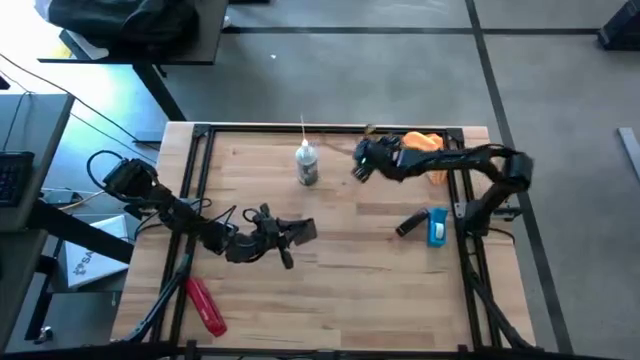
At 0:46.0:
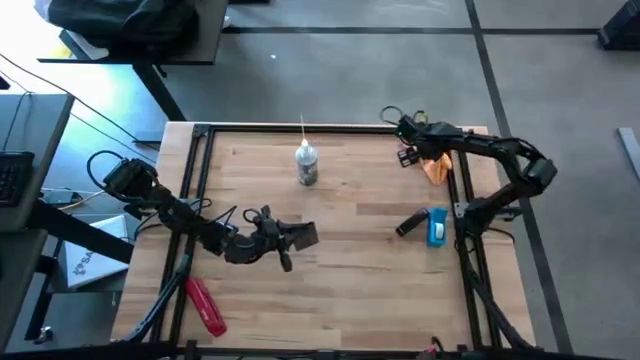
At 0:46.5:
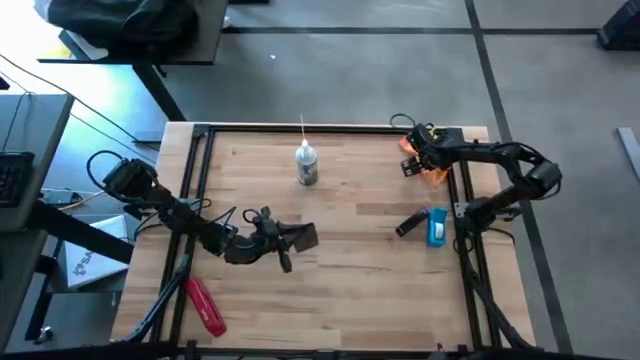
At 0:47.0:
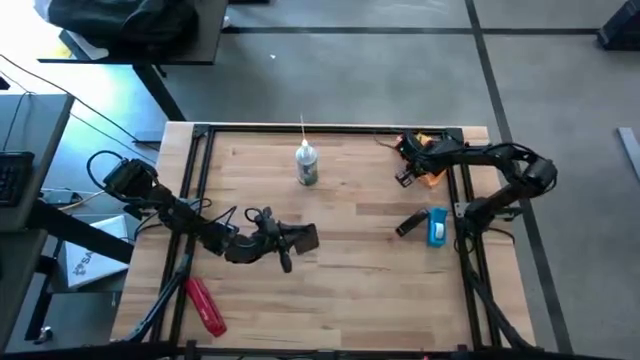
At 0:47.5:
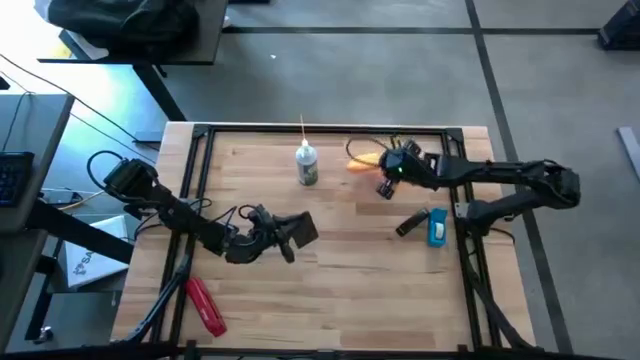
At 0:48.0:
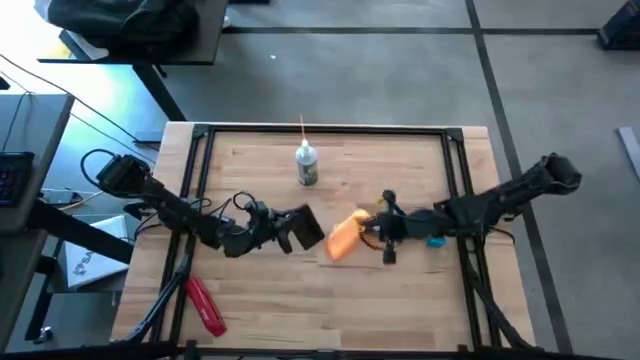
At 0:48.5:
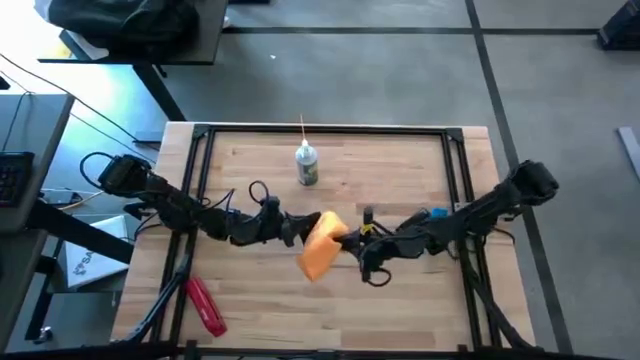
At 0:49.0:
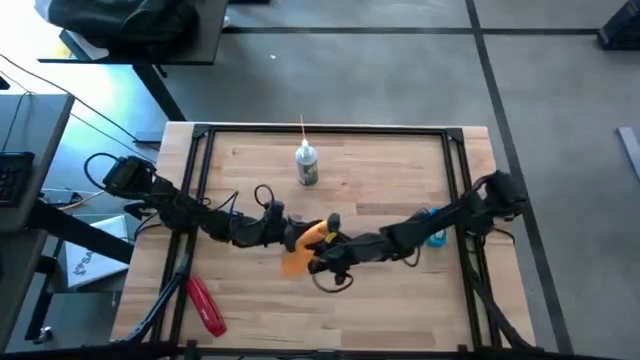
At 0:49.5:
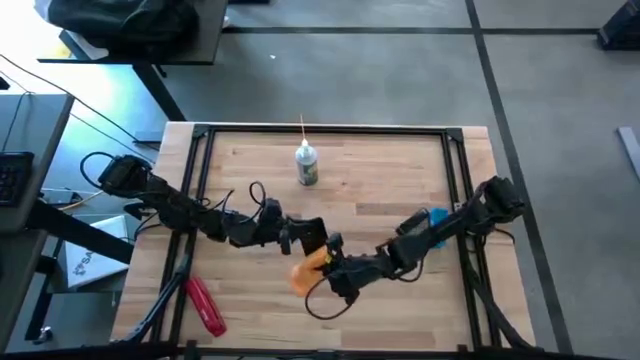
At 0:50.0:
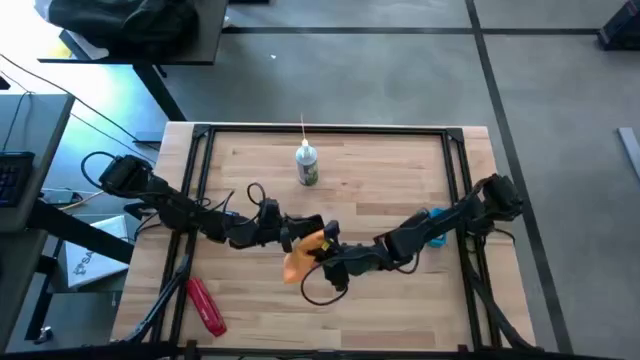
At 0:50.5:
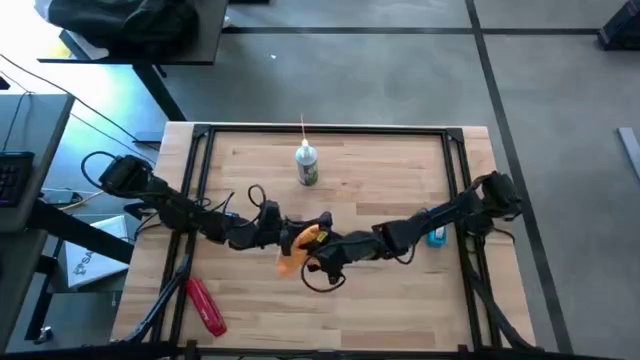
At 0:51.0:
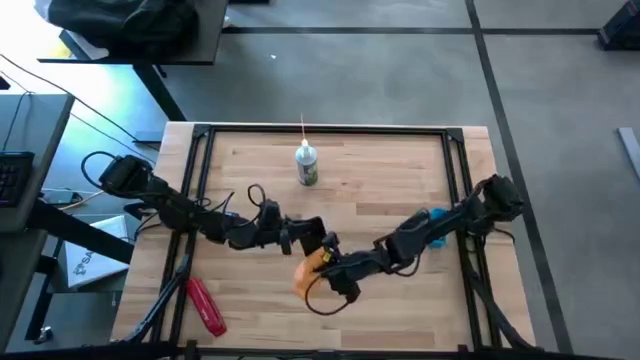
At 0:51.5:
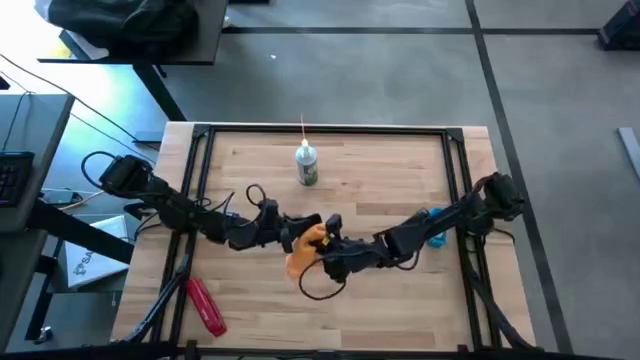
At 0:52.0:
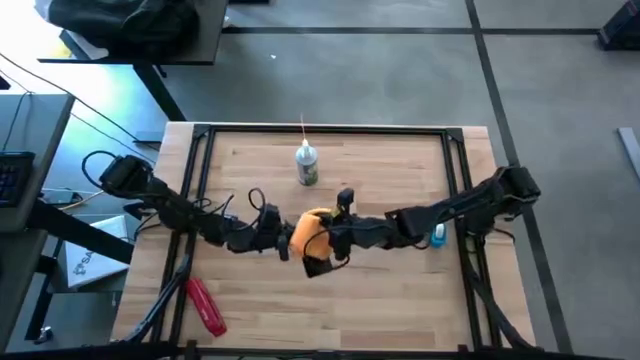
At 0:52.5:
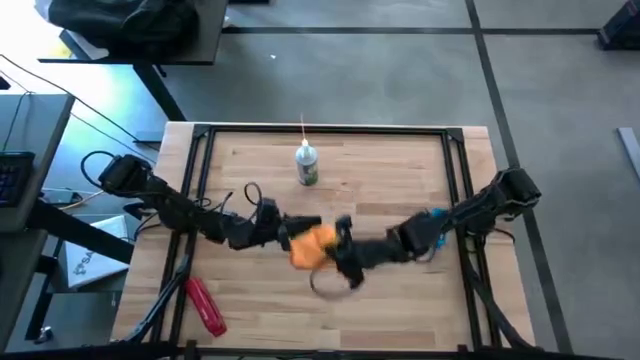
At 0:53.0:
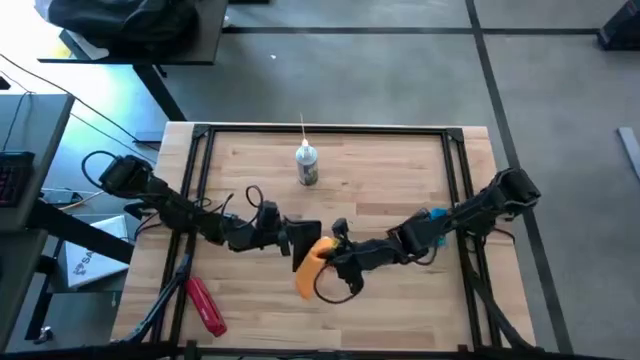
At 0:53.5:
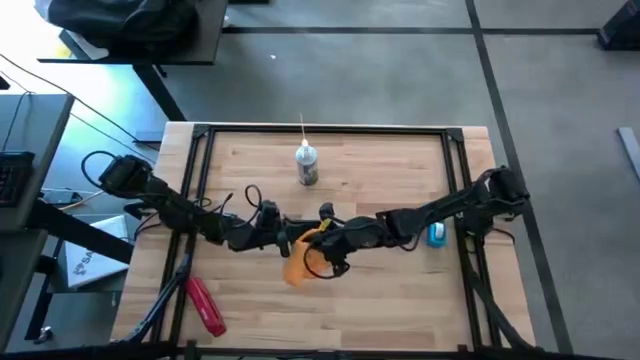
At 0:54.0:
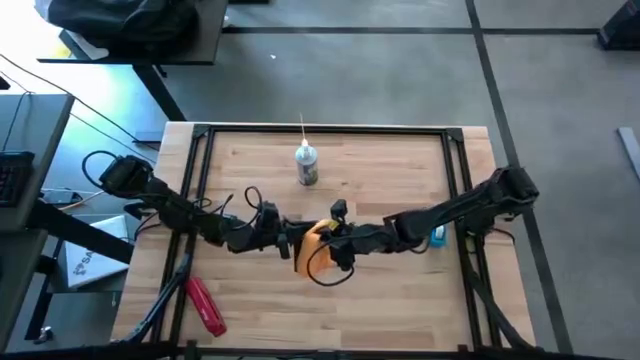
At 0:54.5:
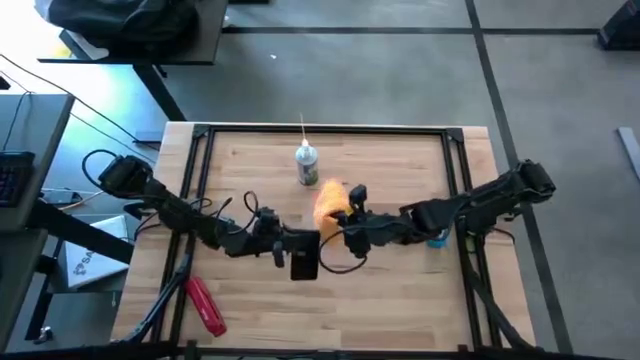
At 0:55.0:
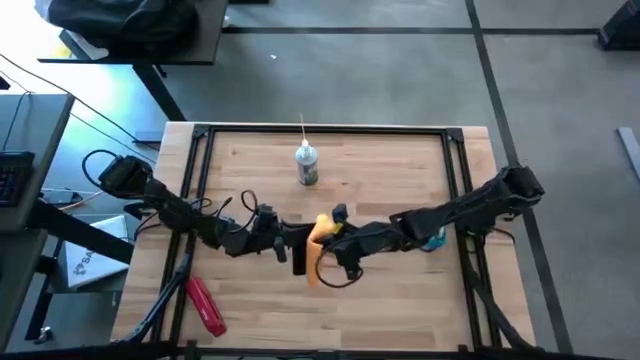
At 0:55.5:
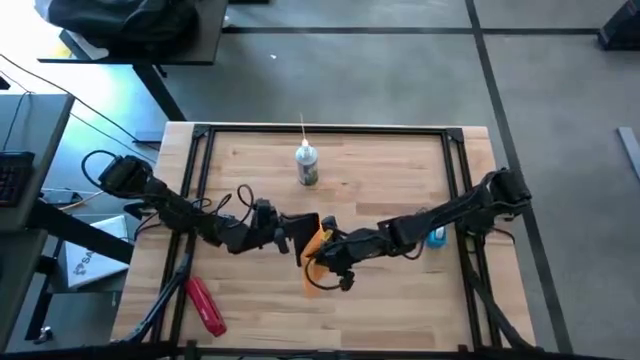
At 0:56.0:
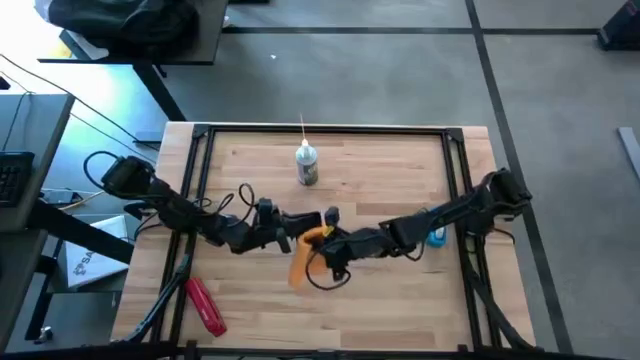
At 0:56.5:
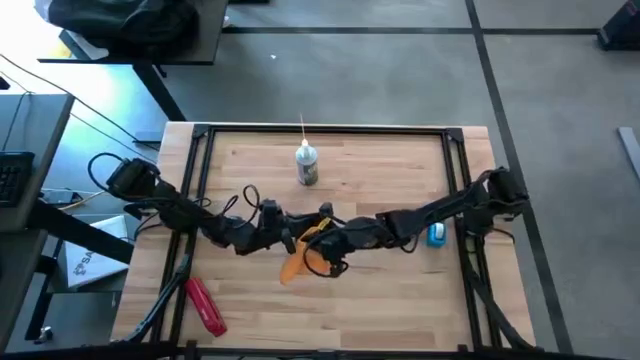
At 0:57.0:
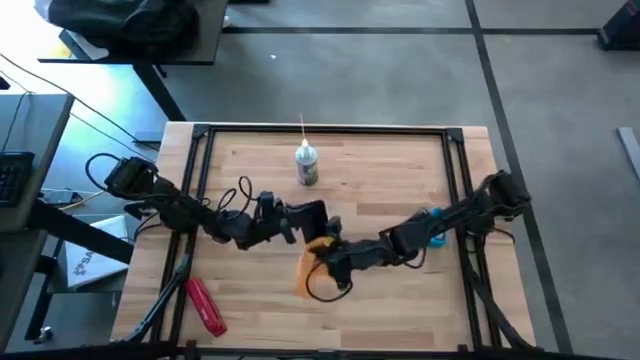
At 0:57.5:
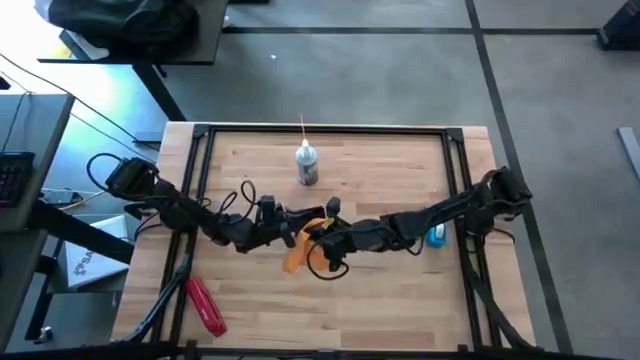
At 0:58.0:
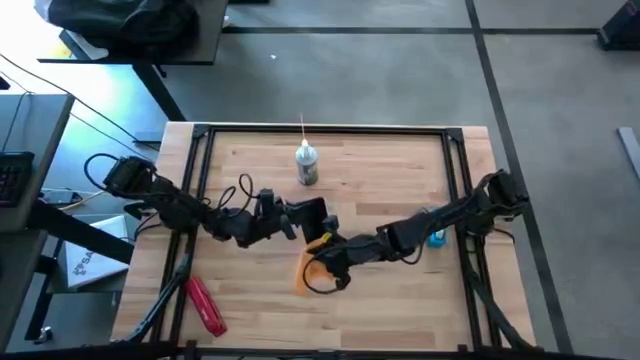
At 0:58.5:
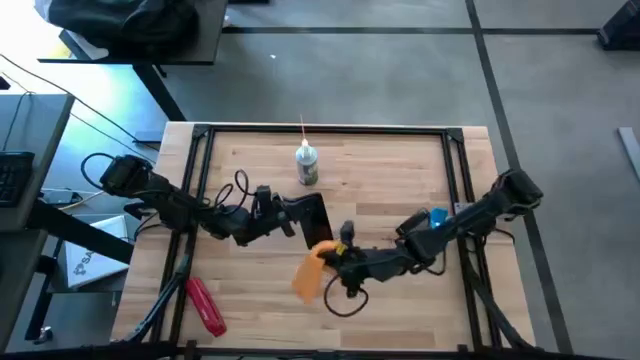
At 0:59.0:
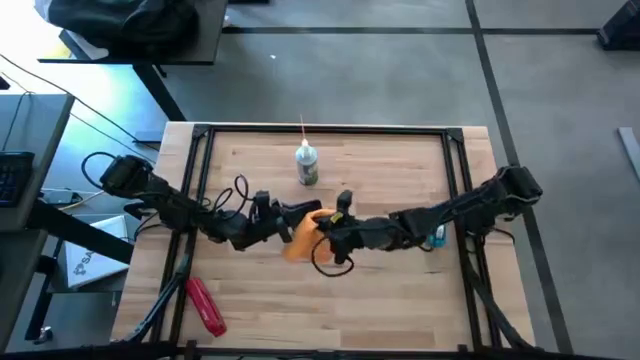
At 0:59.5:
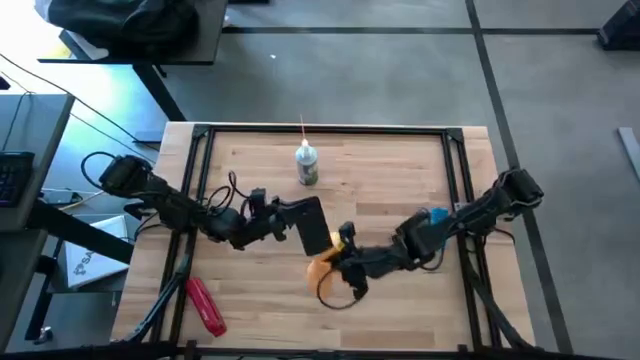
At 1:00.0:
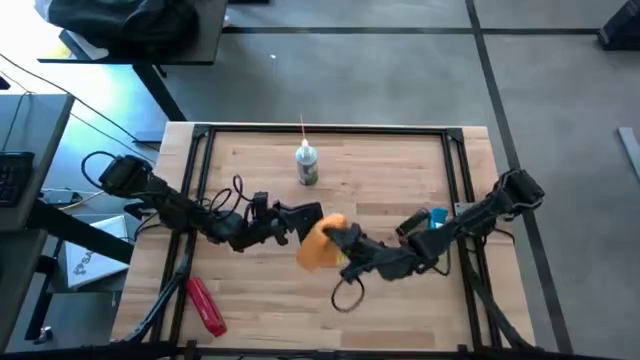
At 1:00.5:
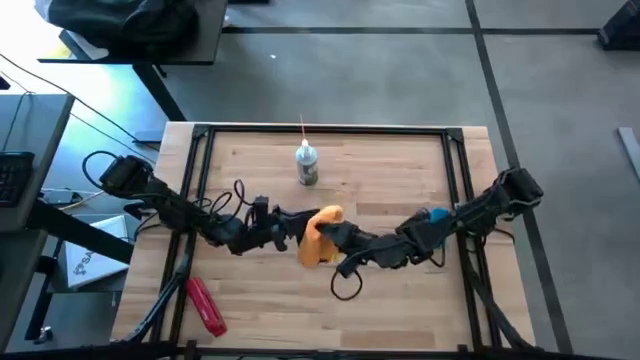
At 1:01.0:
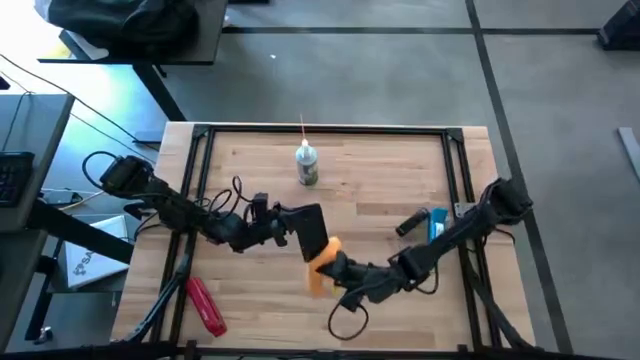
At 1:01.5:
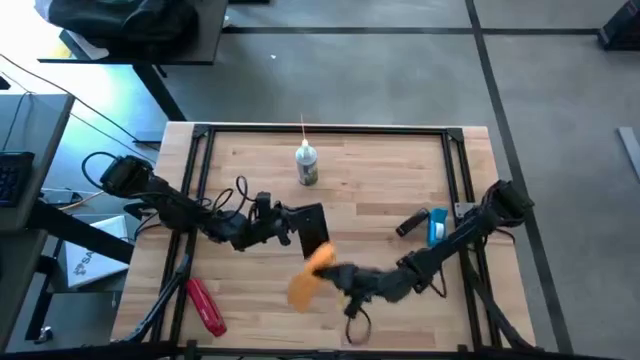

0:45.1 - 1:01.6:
Task: Apply microfiber cloth
Wipe the front of the cellphone with a microfiber cloth

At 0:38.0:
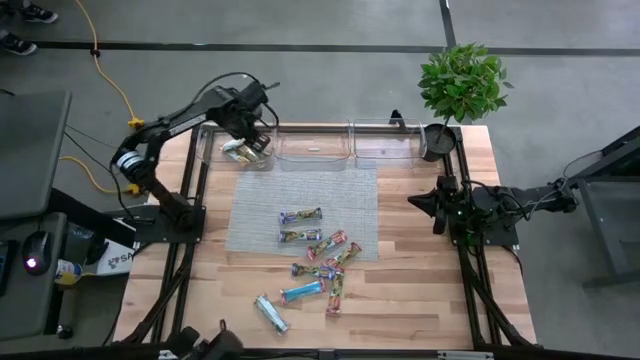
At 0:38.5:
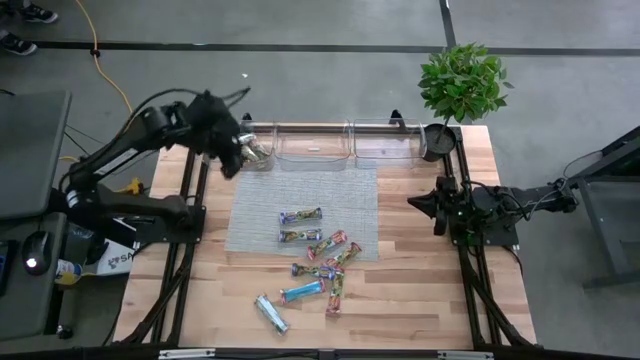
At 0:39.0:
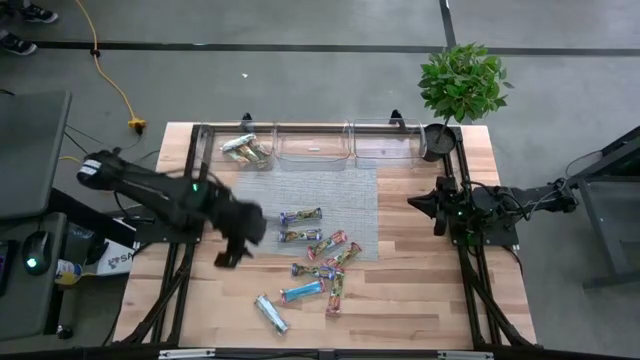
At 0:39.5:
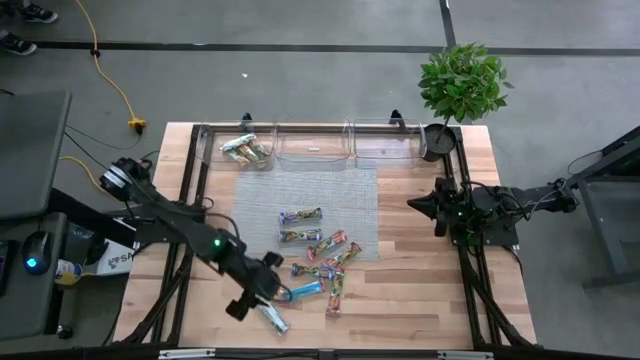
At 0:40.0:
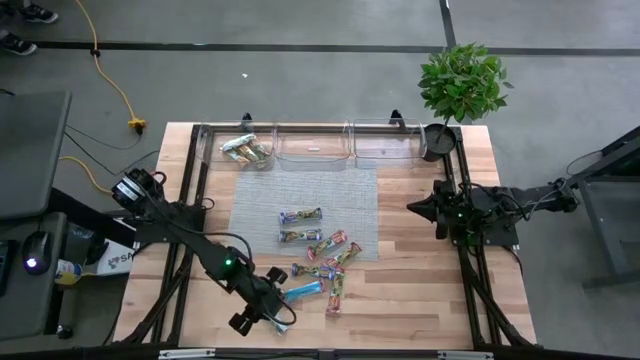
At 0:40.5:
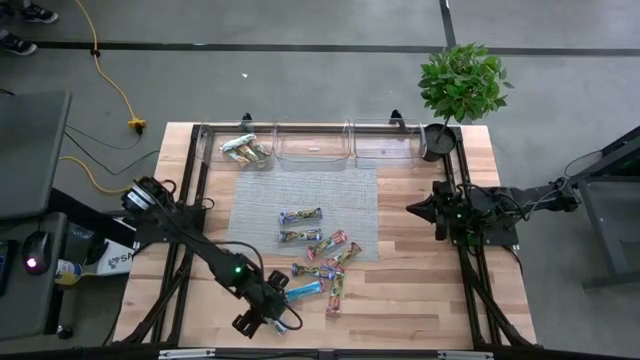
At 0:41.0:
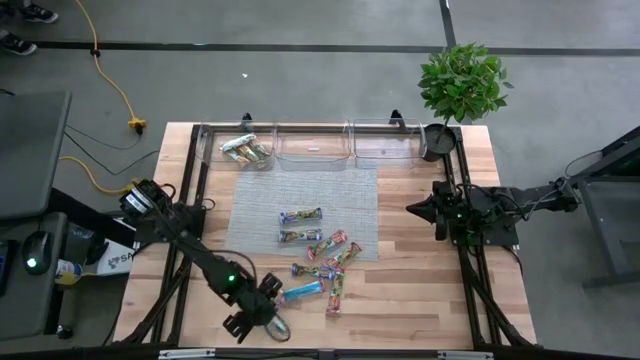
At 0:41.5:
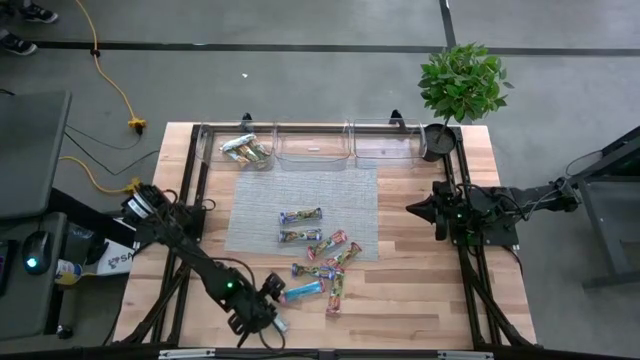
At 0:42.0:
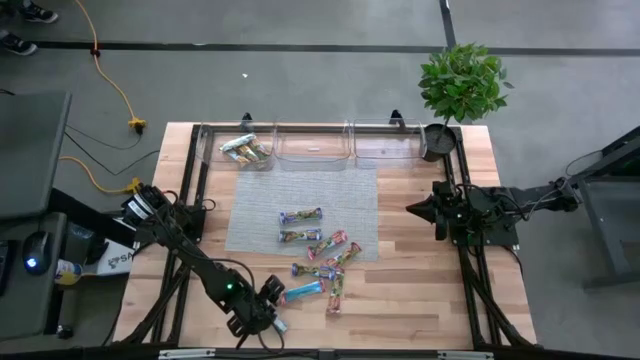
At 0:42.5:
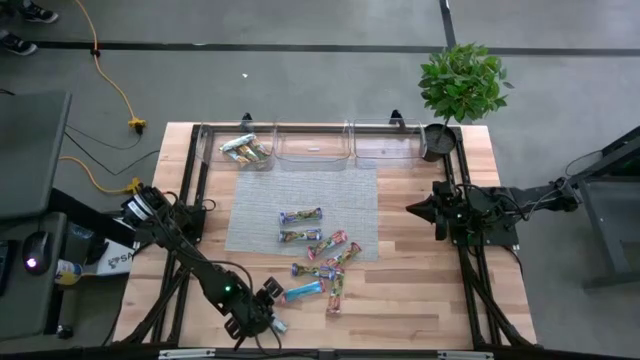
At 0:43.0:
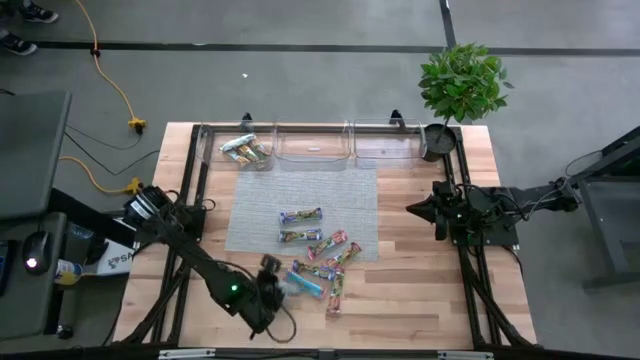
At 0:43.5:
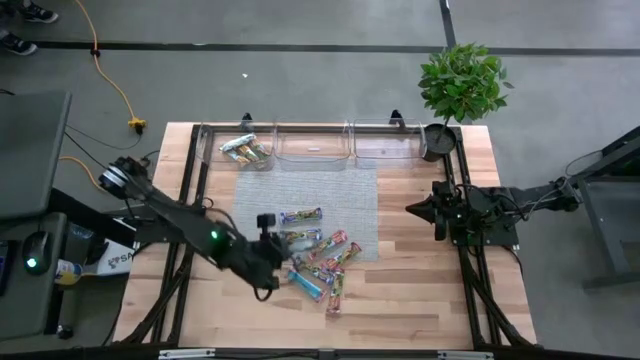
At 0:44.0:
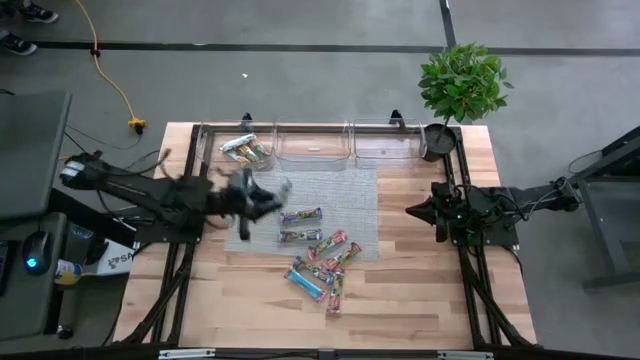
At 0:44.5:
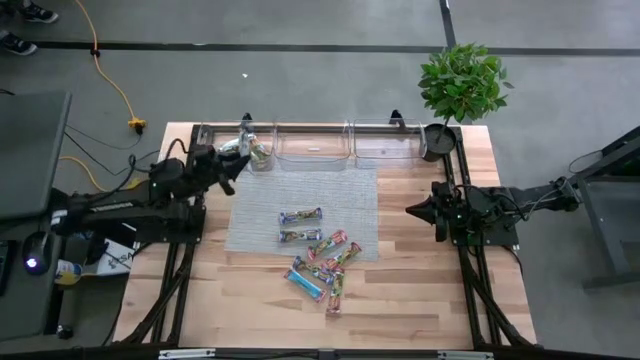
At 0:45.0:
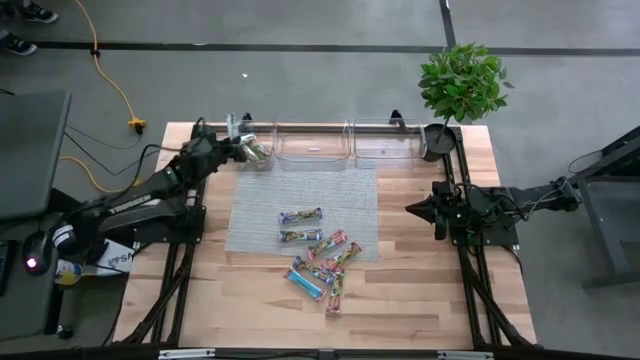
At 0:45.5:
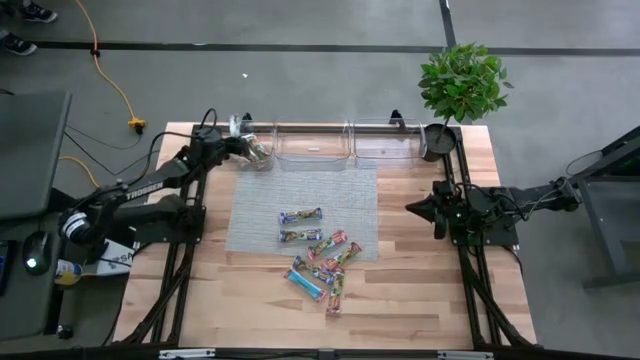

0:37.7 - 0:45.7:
Task: Pick and place Granola Bars by type
Put the yellow granola bar into the left transparent bin
